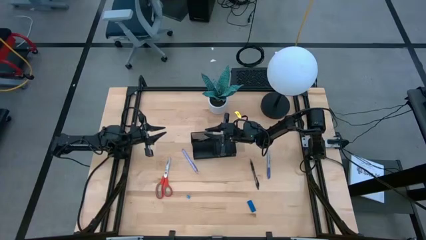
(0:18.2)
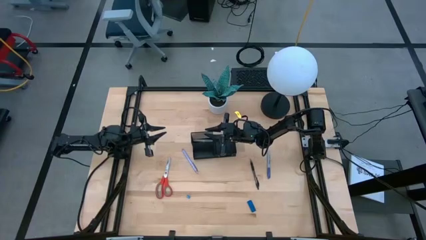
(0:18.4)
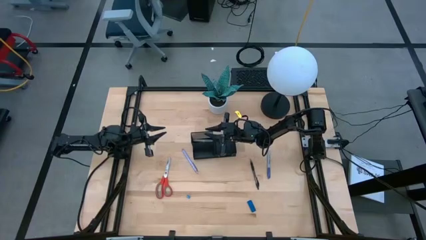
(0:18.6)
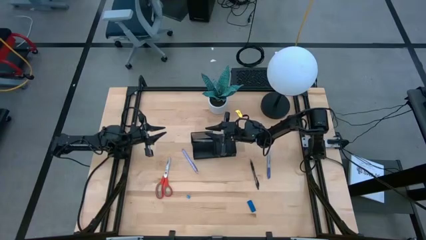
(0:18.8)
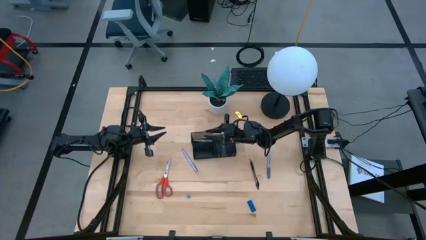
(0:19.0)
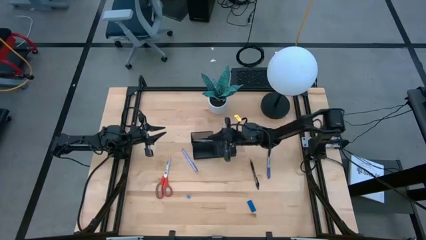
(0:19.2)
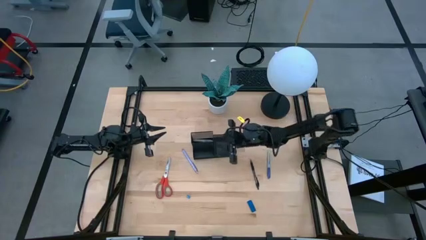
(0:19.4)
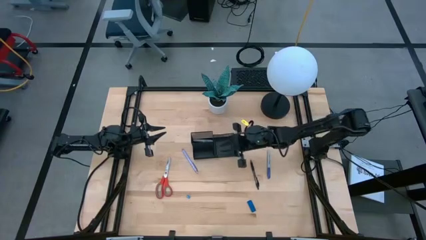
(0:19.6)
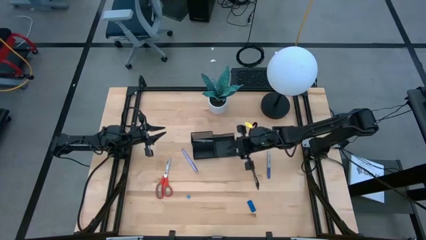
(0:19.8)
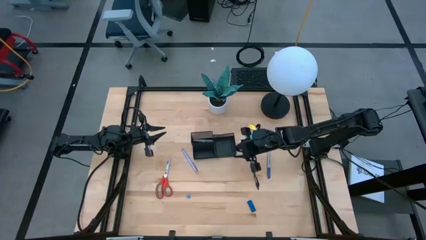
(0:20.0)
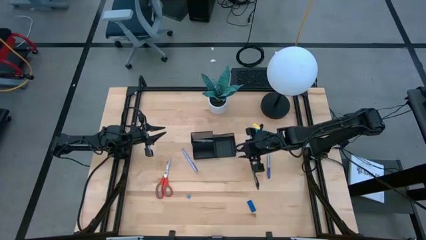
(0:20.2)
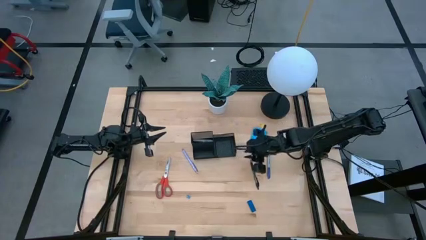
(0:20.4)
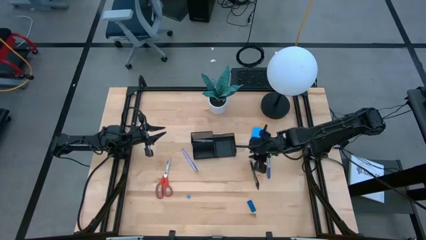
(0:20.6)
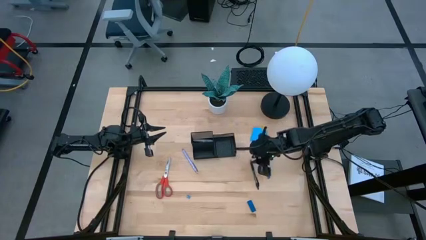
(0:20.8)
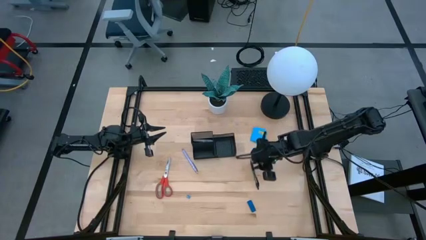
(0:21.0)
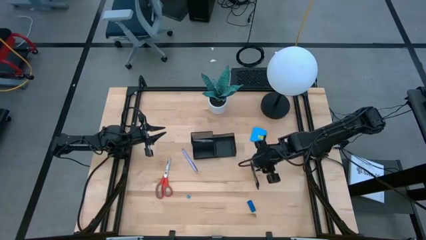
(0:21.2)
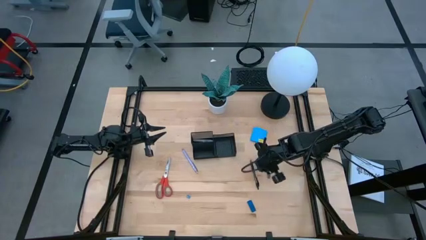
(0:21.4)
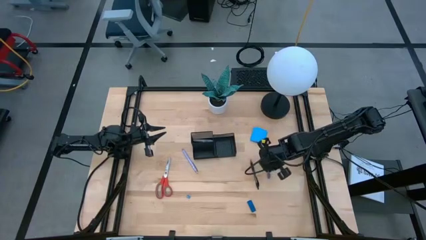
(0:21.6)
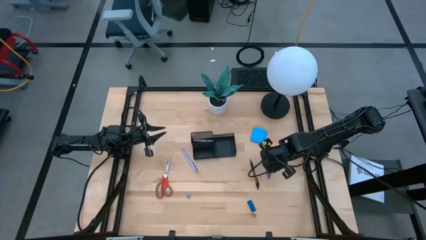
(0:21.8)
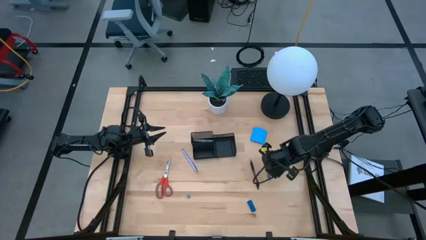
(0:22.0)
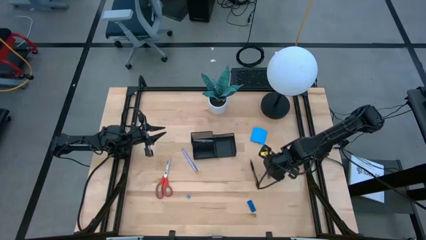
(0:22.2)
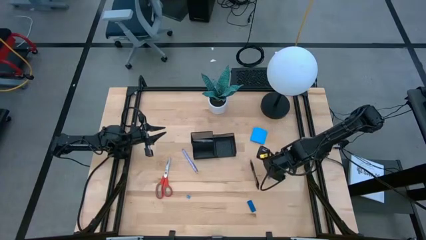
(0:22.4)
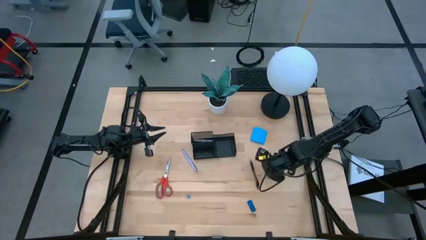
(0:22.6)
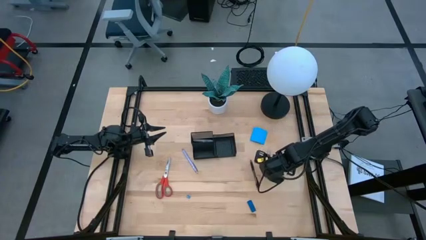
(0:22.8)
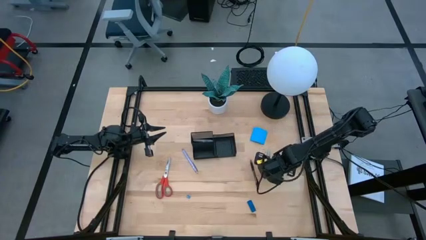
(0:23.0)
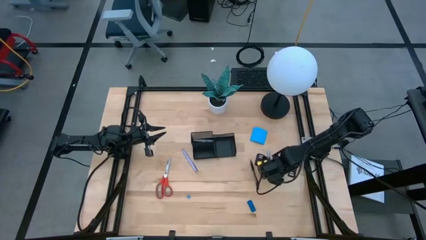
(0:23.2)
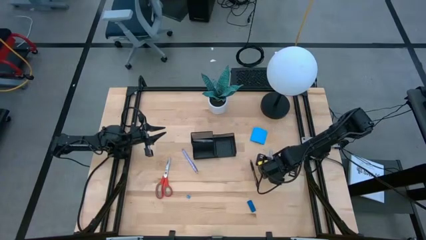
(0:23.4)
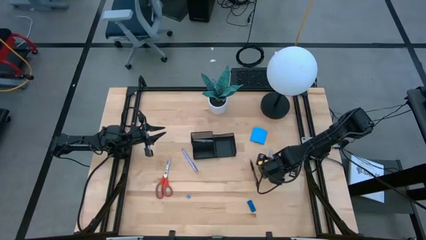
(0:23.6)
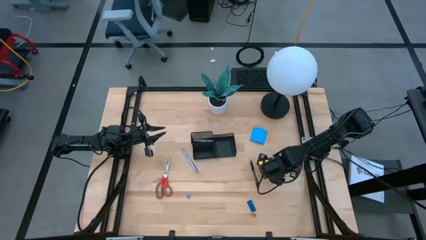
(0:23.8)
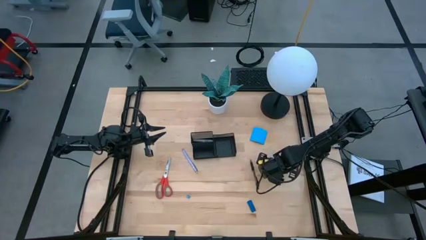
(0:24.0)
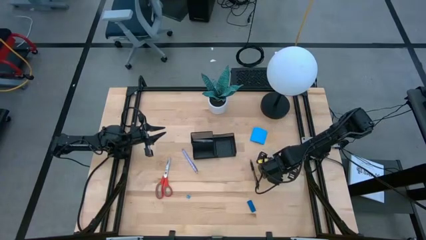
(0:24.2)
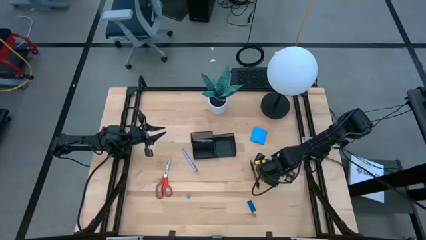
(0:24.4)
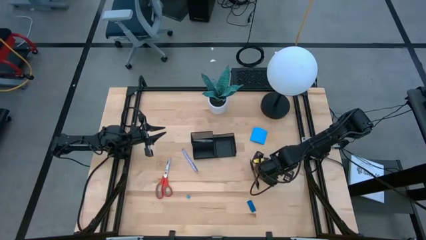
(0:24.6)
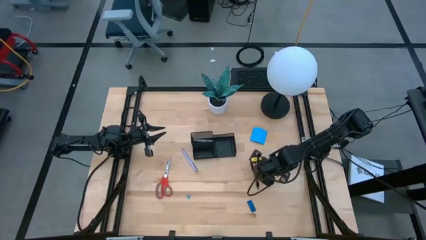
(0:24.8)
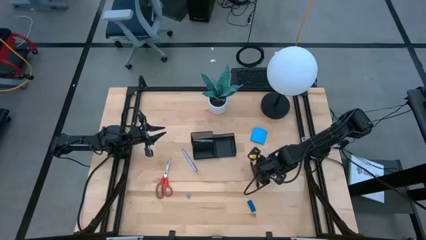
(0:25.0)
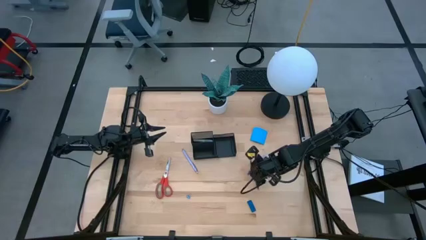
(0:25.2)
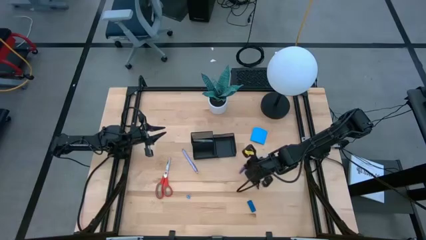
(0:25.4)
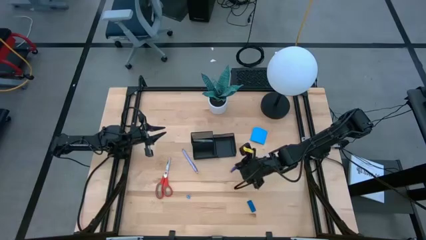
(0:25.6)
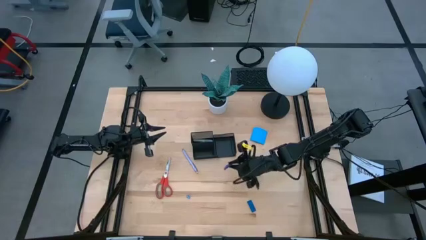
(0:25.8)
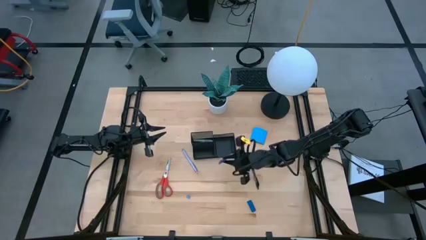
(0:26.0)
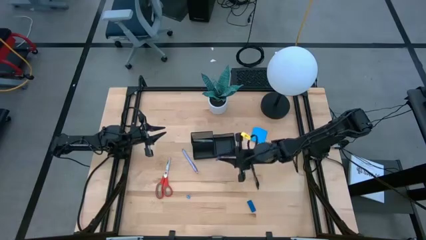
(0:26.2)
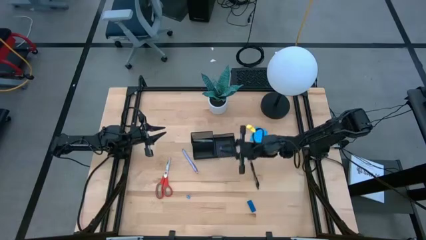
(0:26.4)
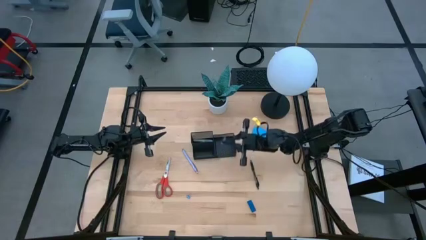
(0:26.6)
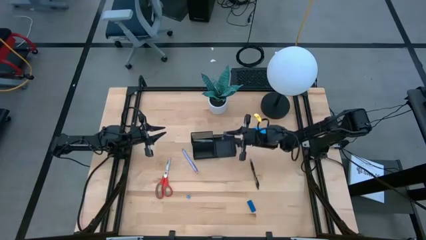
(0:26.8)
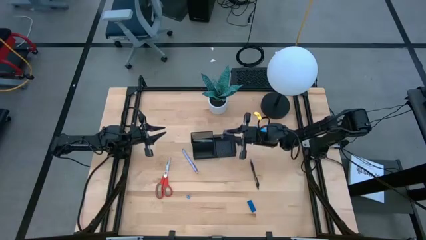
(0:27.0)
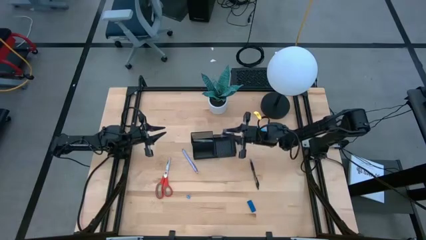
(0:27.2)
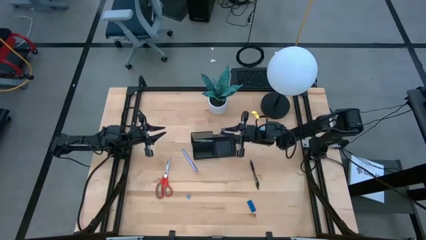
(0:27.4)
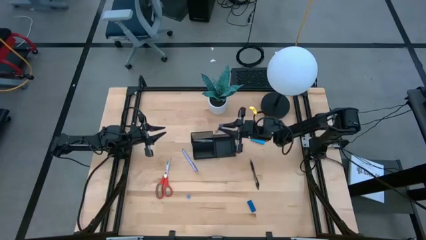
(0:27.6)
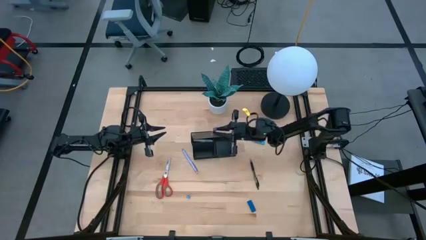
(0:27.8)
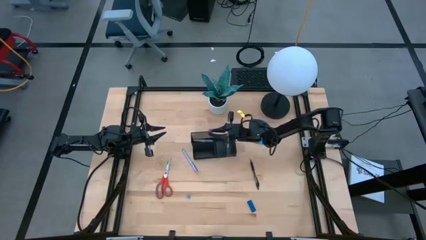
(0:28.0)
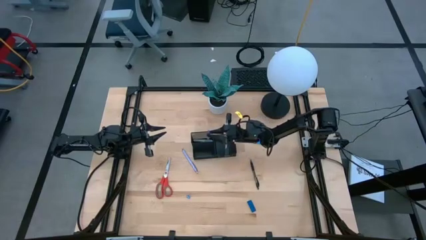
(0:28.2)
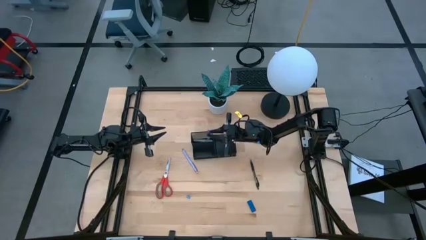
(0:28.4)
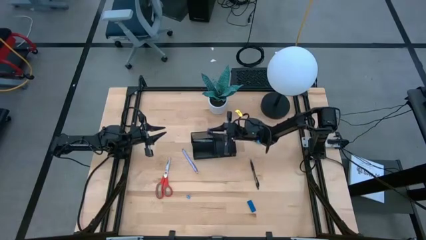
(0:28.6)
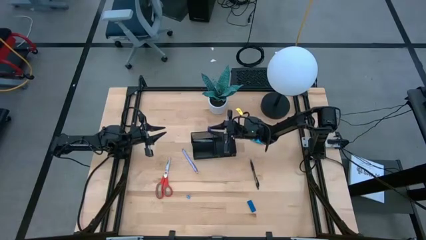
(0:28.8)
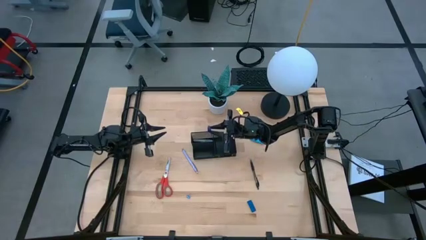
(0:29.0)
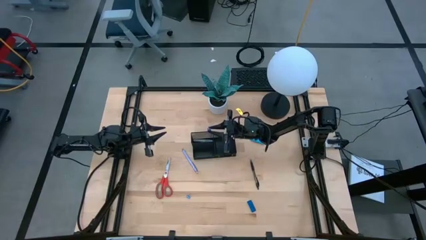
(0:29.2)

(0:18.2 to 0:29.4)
Task: Pick and place office supplies into organizer
Put the purple pen into the top left section of the desk organizer
